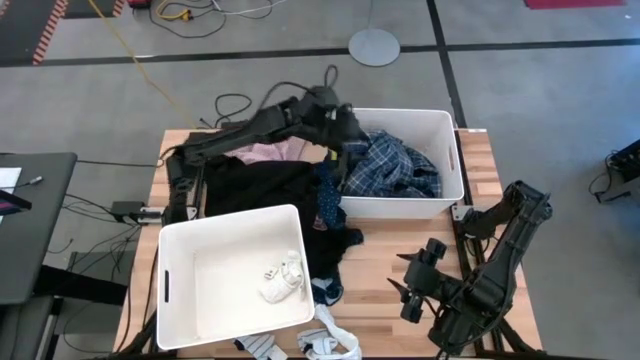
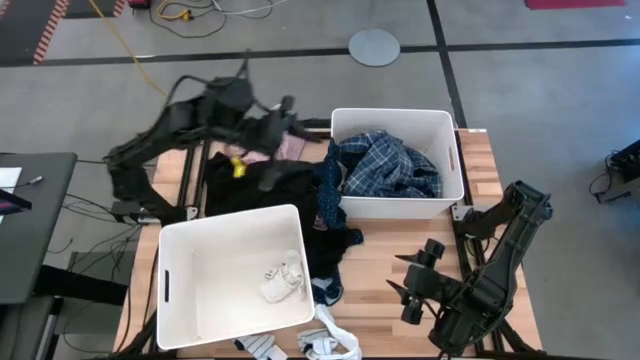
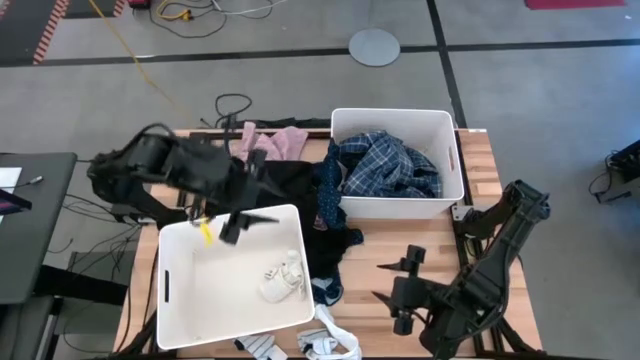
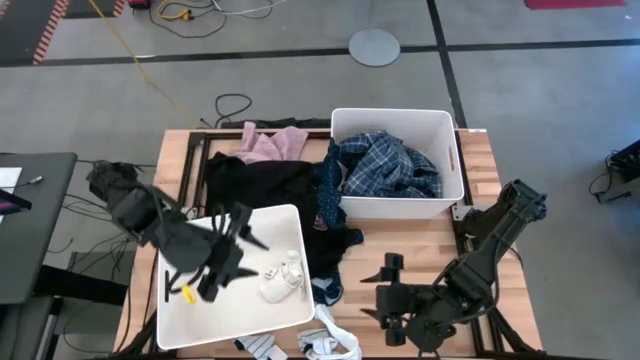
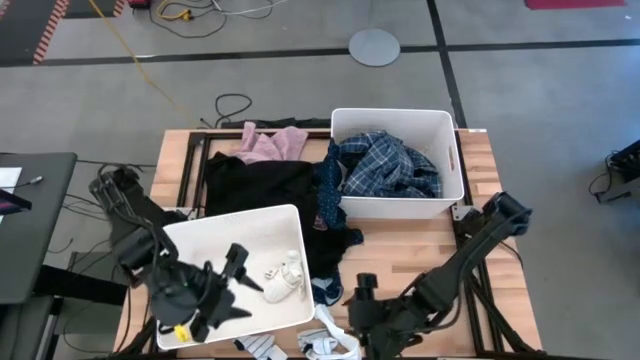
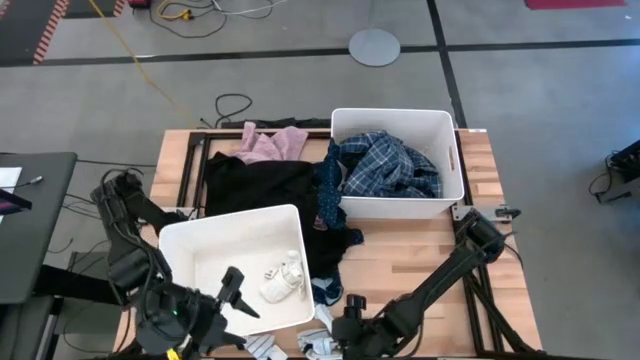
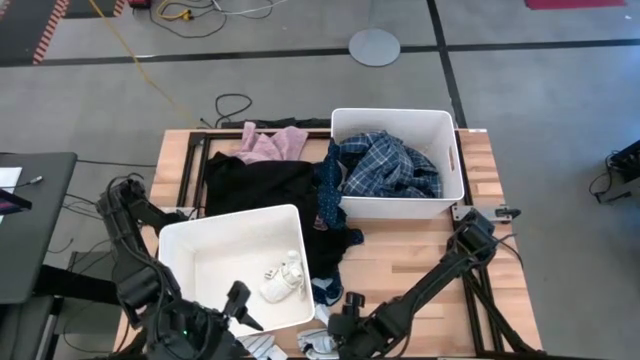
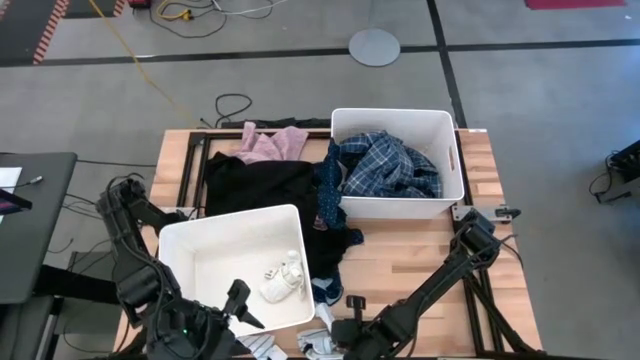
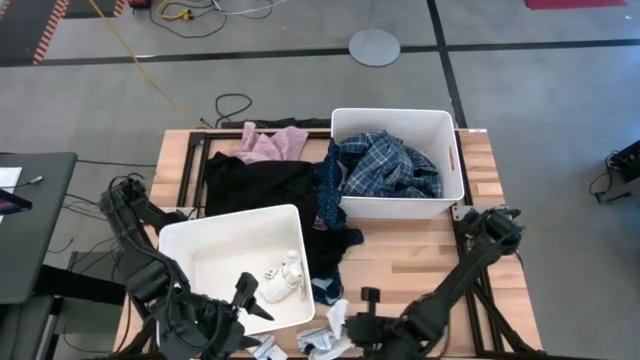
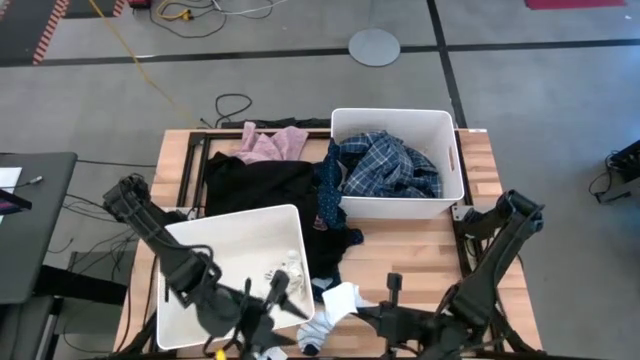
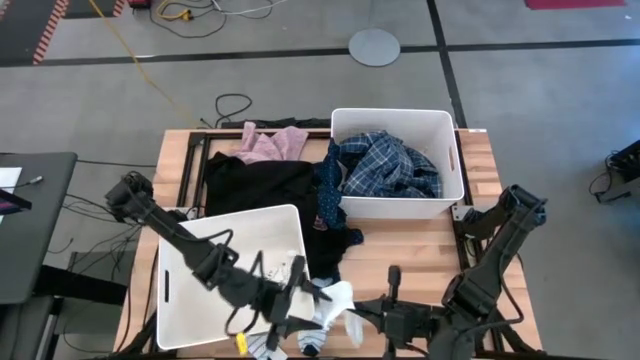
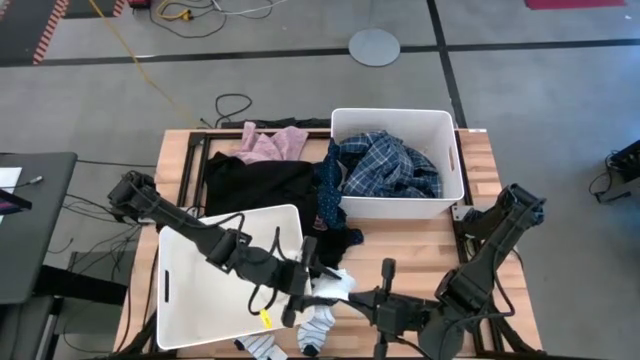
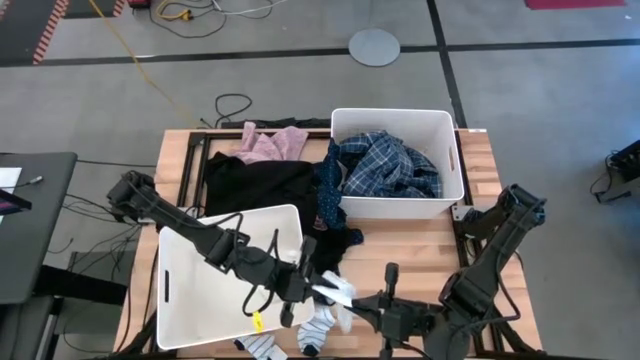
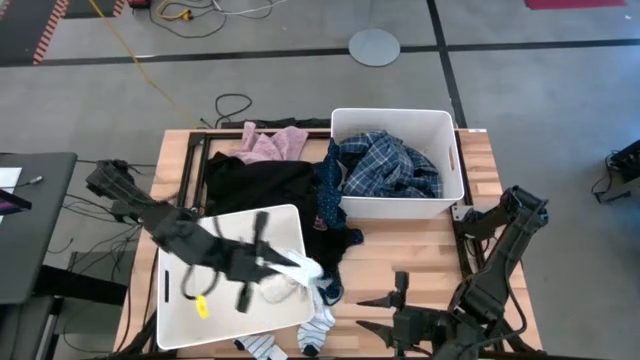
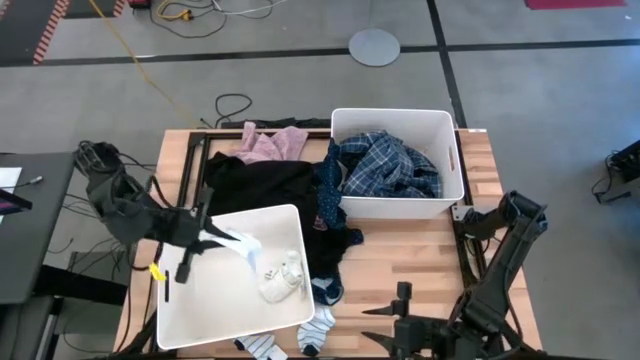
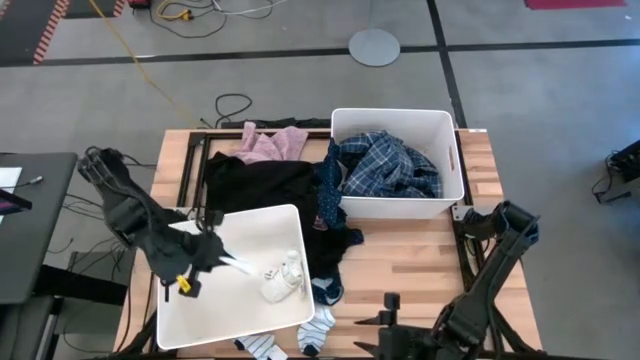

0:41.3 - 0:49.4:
Task: Sort clothes
Put the white sock into the bottom laundry bin

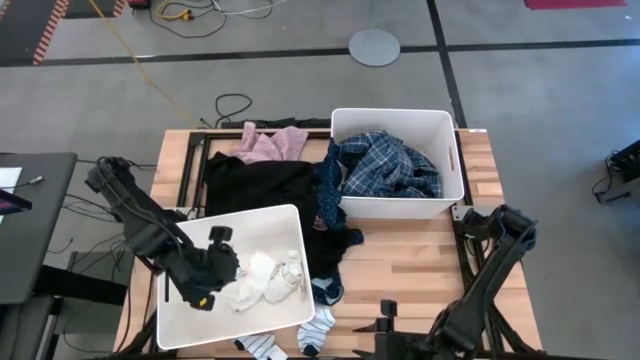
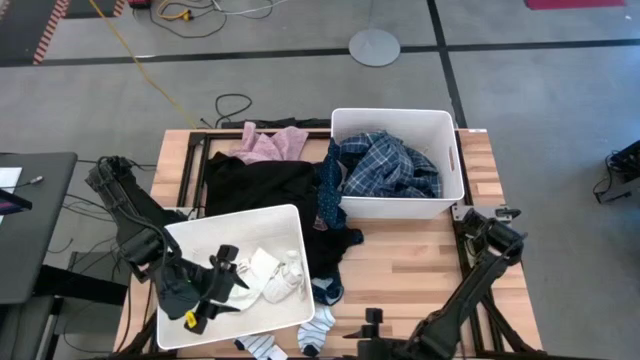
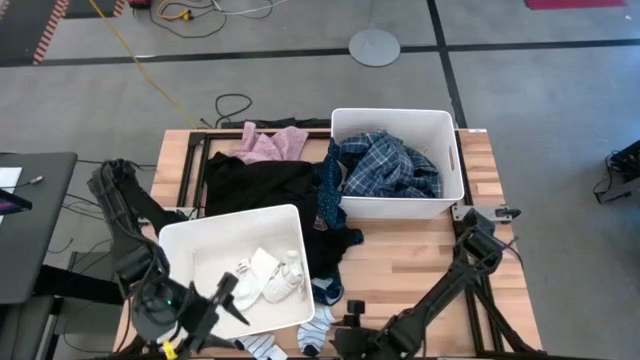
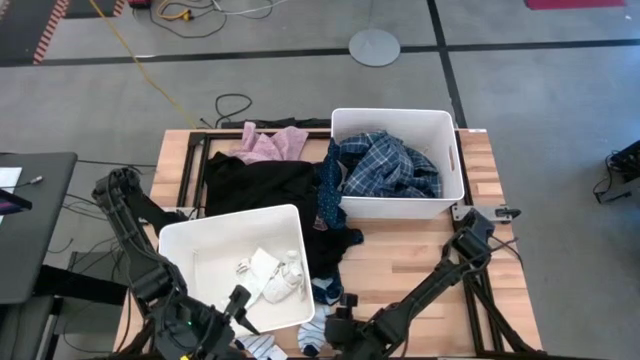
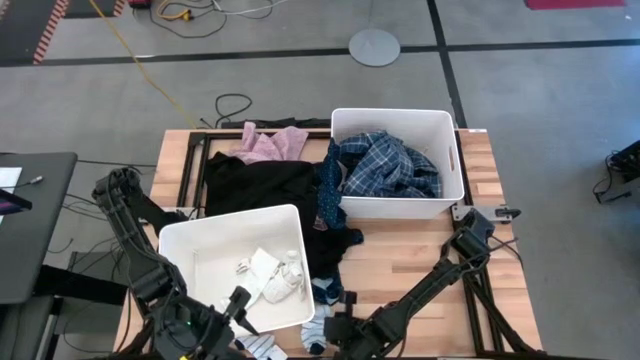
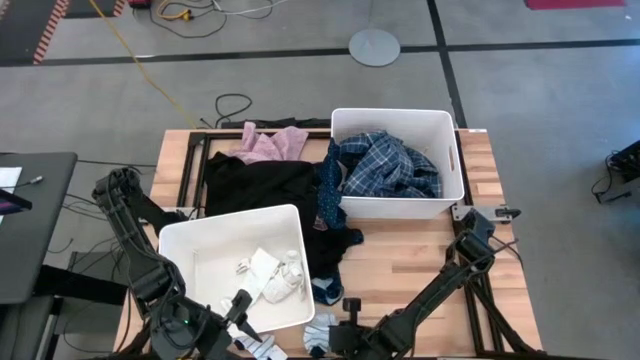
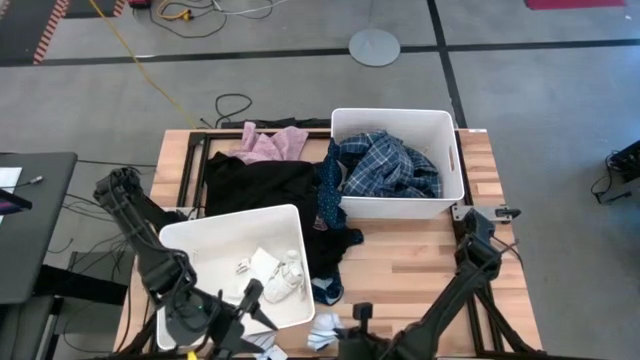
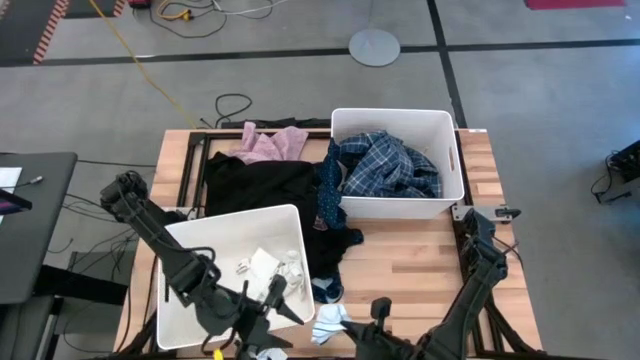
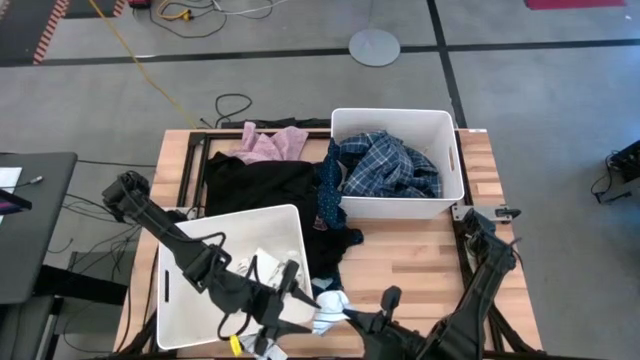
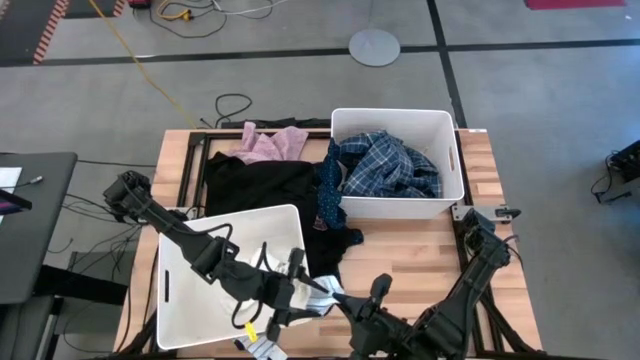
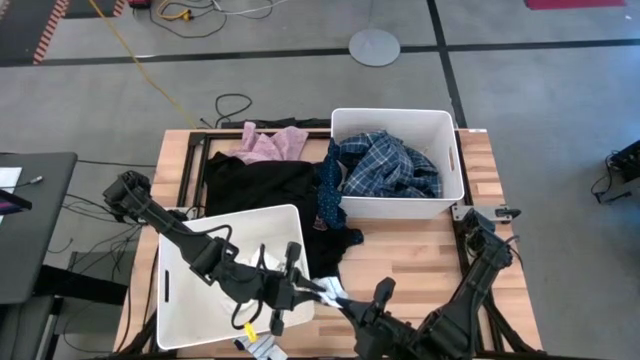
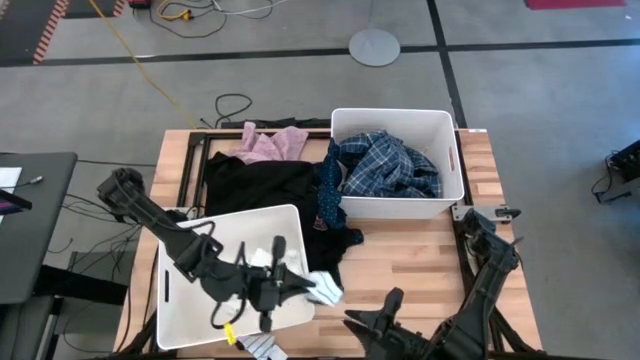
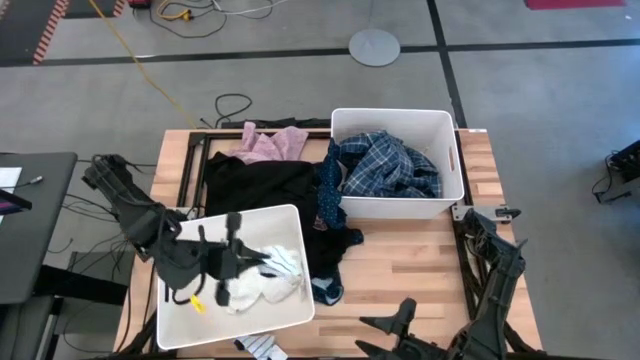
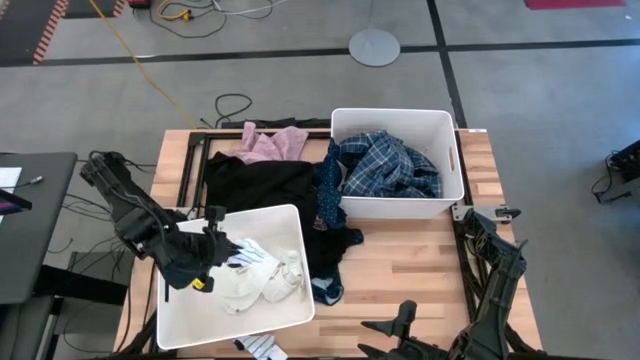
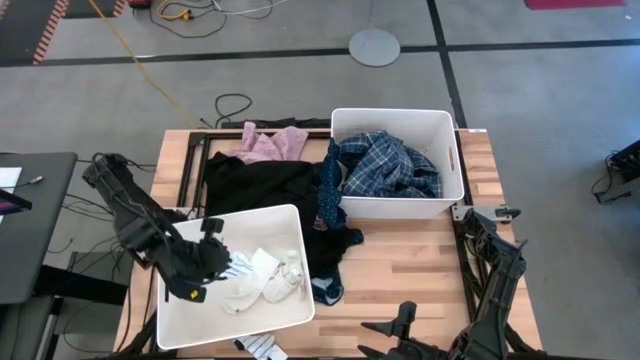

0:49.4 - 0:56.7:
Put the right striped sock into the bottom laundry bin

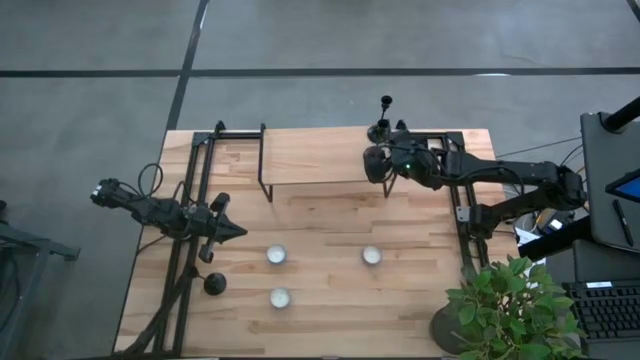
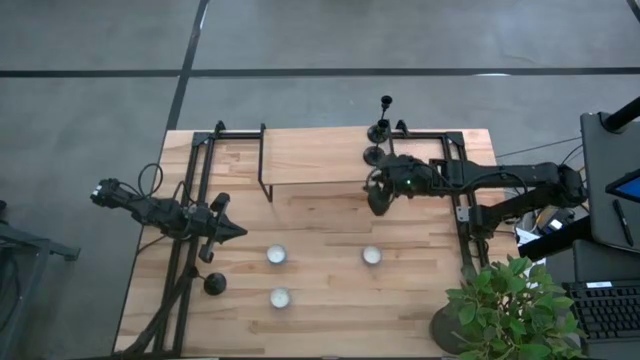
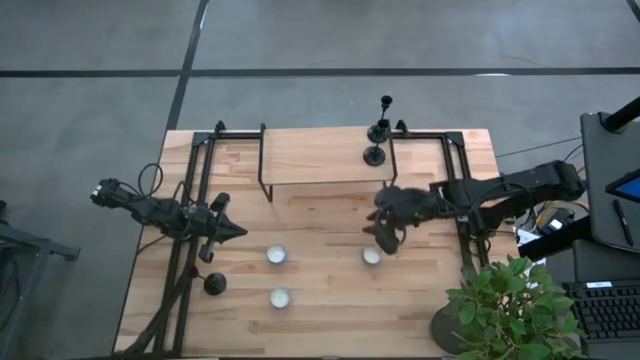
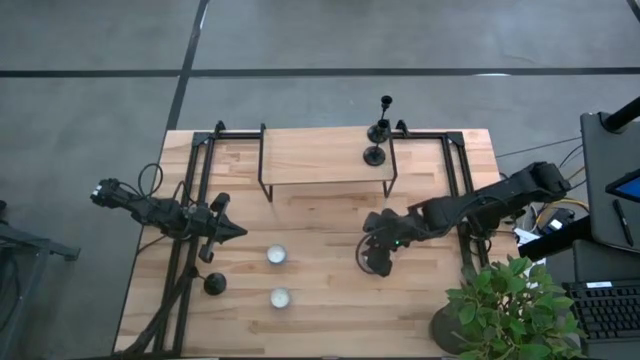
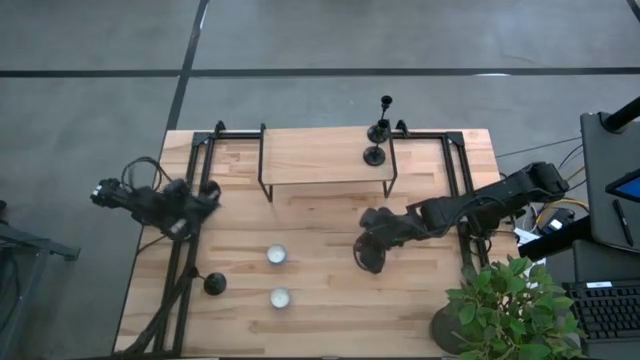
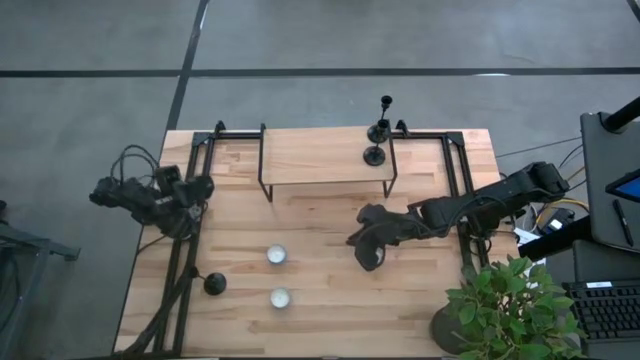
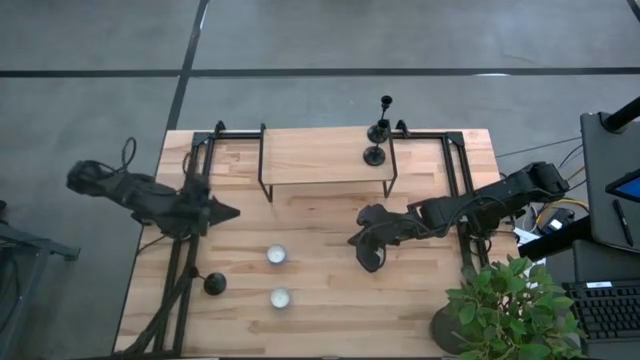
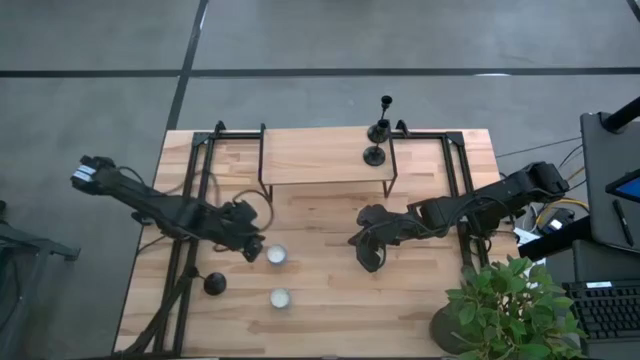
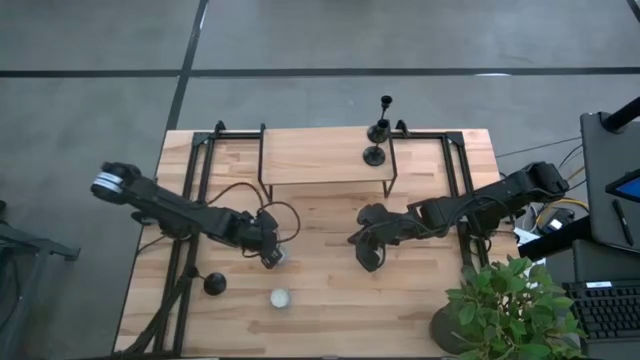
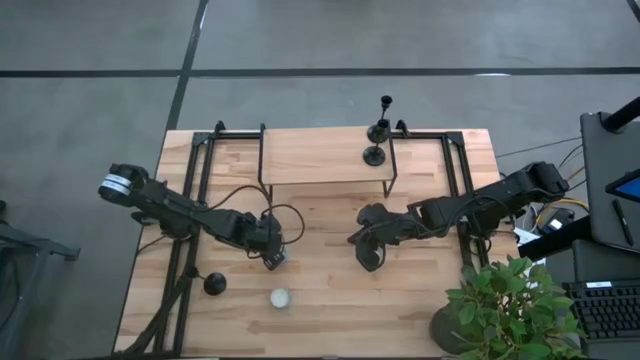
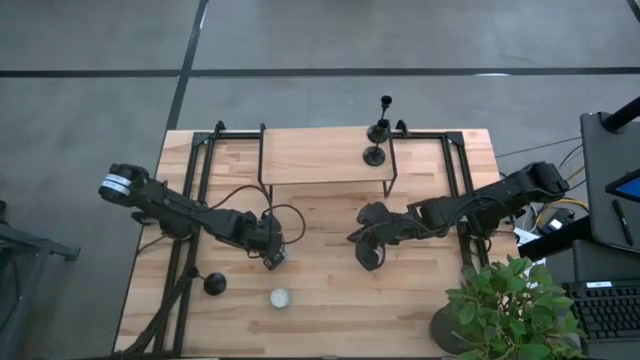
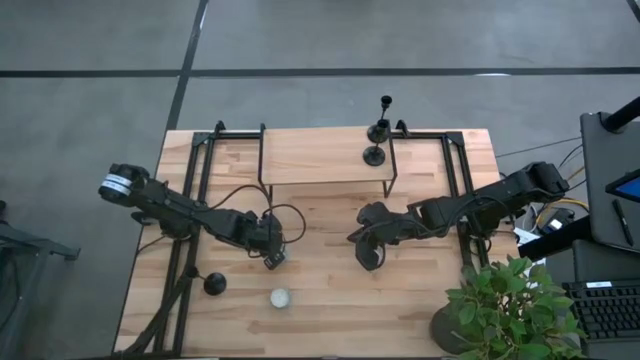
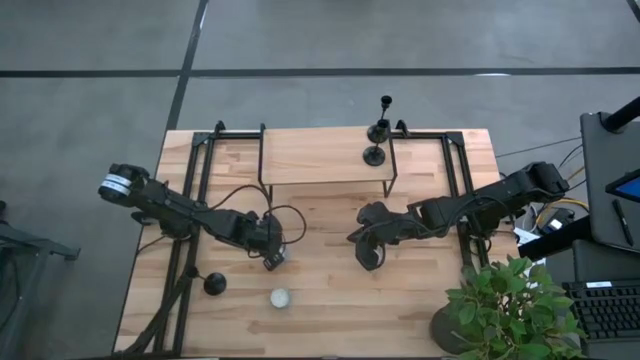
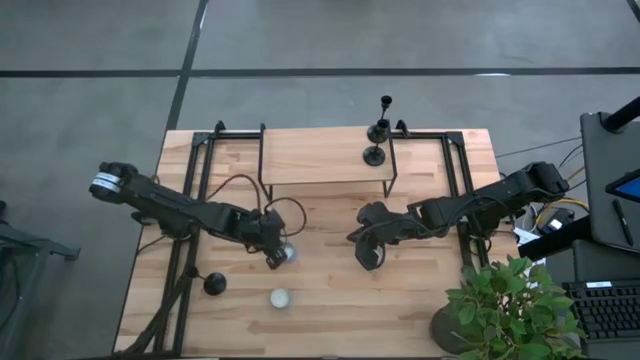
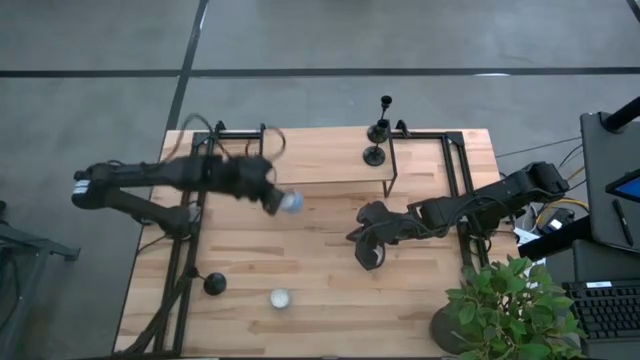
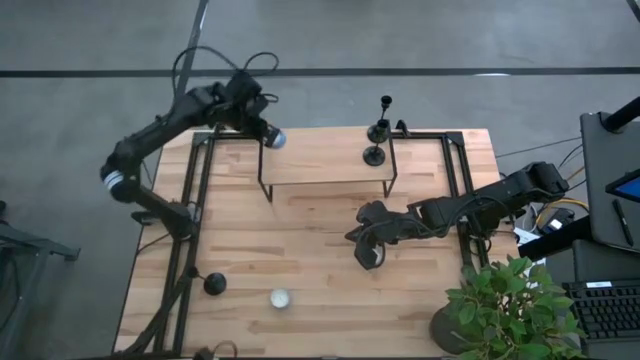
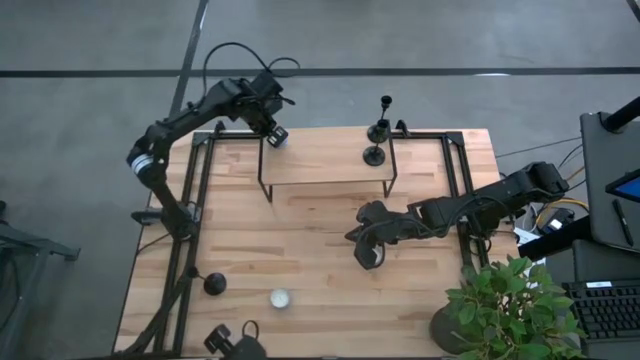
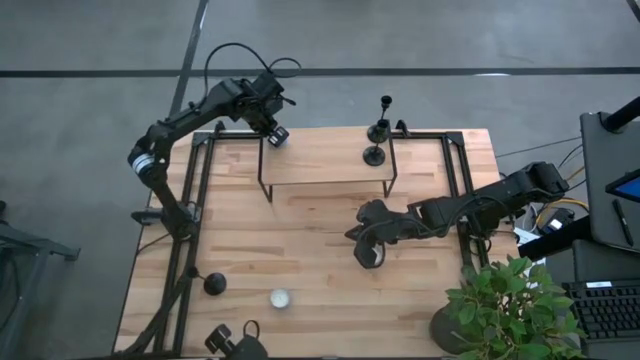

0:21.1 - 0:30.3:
Task: Pick & Place candle stick holders
Put the blue scented candle on the shelf
